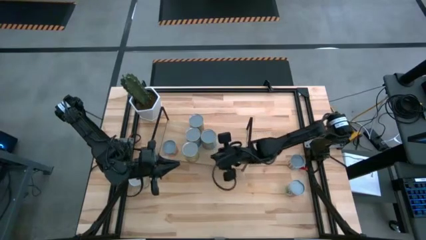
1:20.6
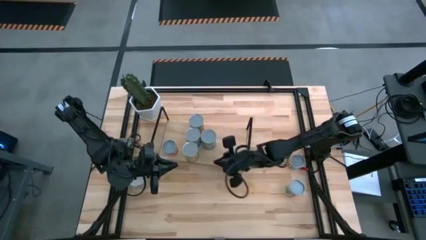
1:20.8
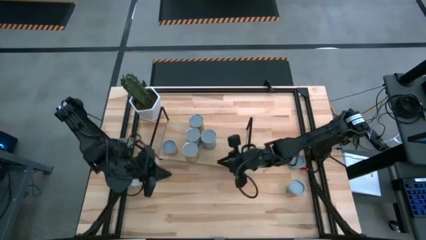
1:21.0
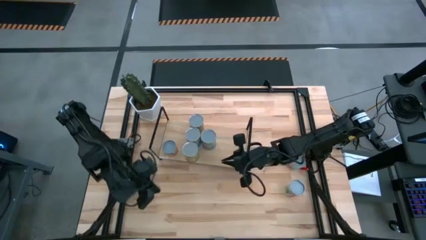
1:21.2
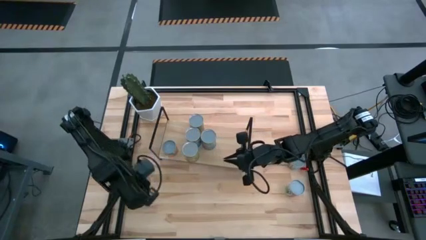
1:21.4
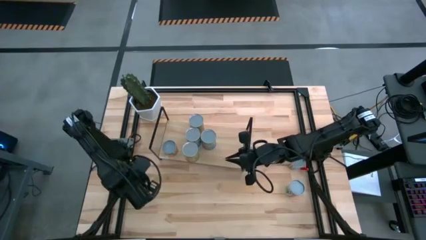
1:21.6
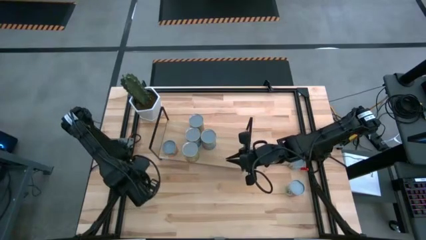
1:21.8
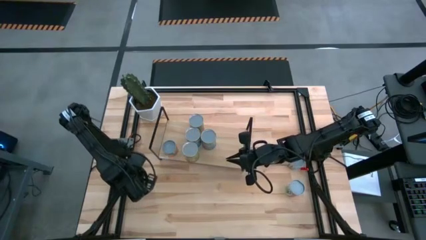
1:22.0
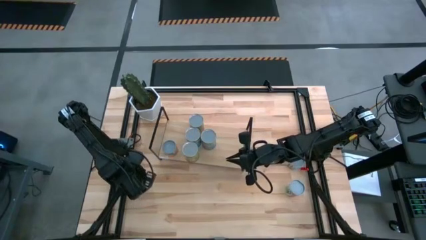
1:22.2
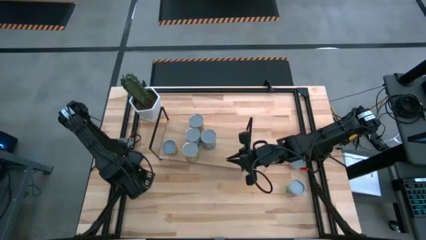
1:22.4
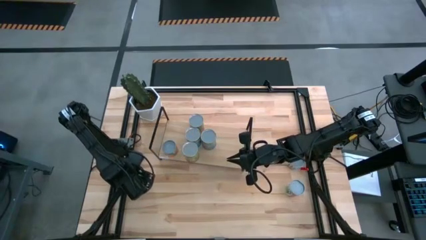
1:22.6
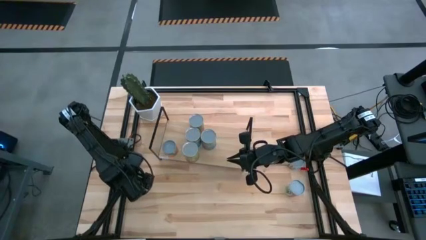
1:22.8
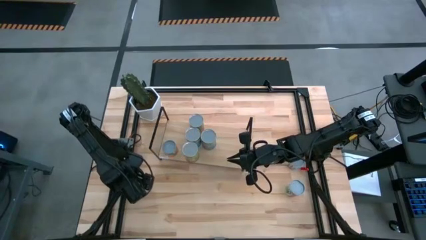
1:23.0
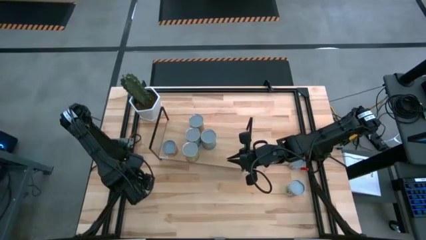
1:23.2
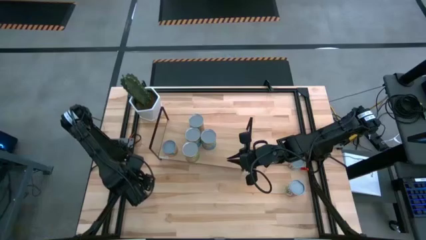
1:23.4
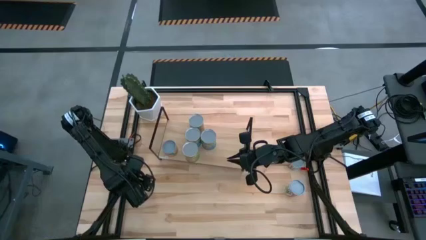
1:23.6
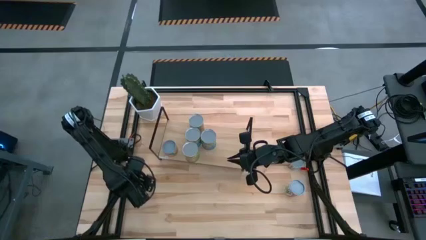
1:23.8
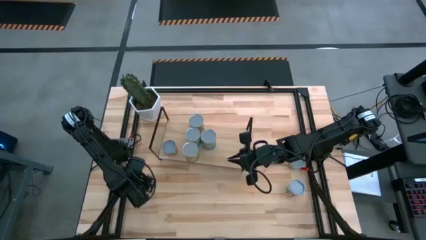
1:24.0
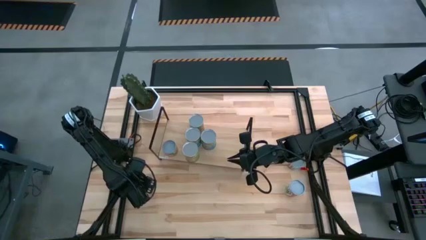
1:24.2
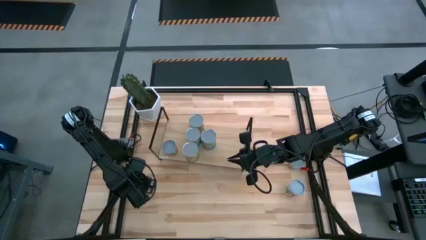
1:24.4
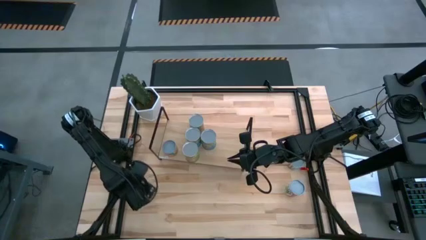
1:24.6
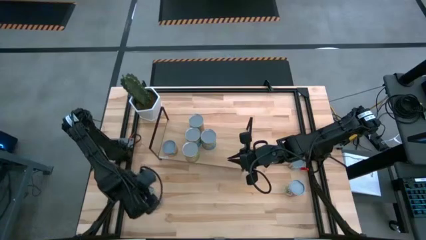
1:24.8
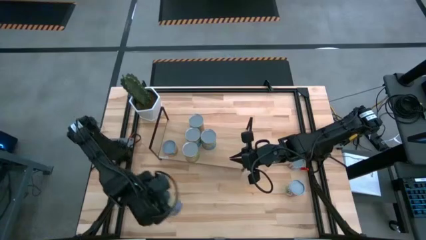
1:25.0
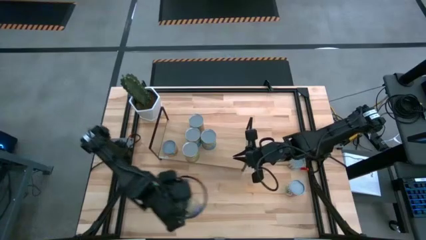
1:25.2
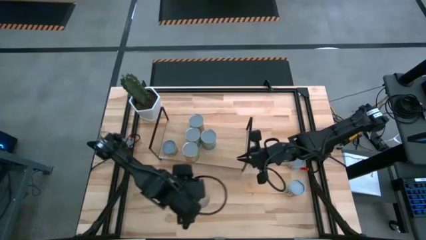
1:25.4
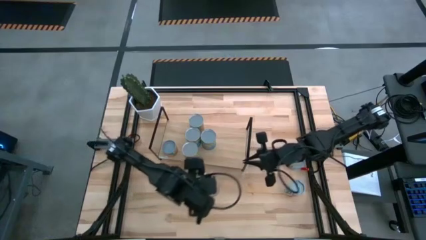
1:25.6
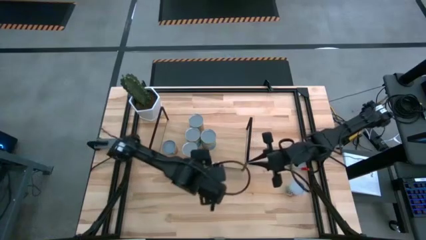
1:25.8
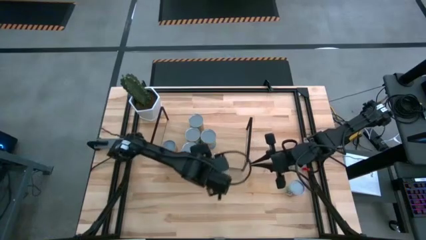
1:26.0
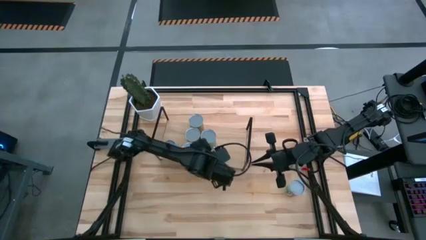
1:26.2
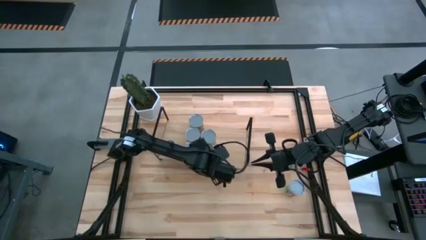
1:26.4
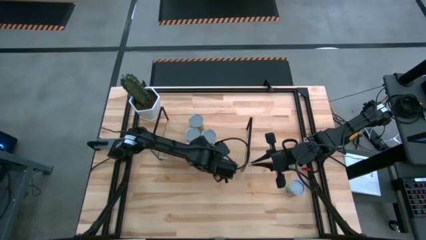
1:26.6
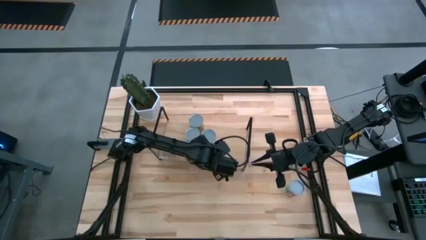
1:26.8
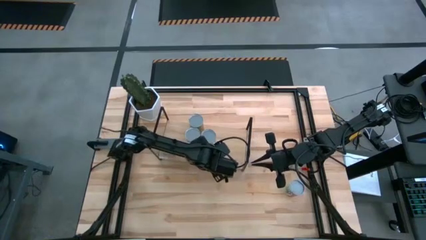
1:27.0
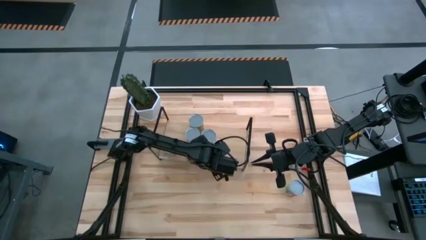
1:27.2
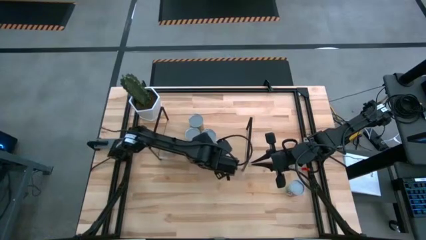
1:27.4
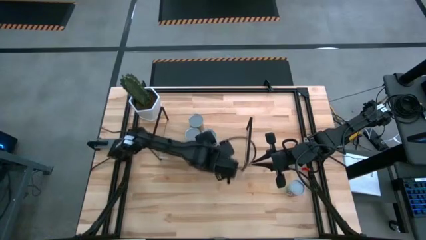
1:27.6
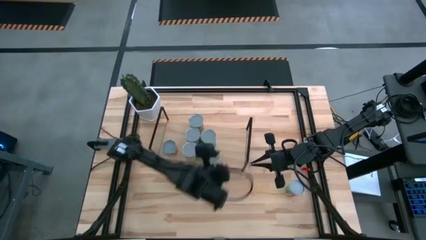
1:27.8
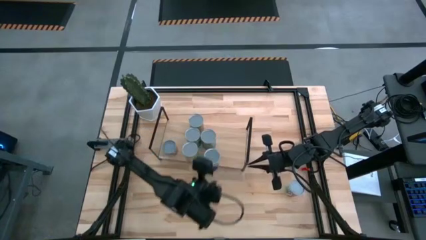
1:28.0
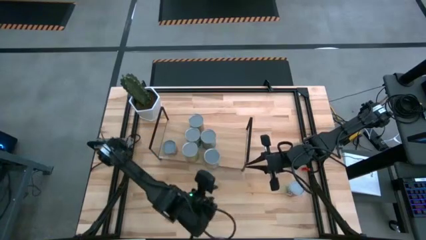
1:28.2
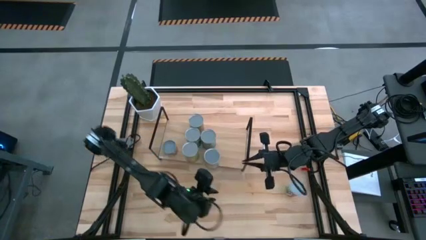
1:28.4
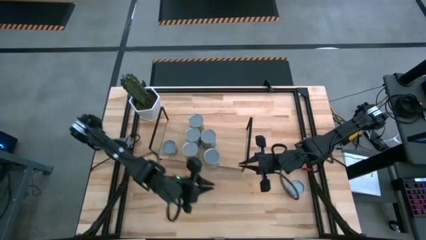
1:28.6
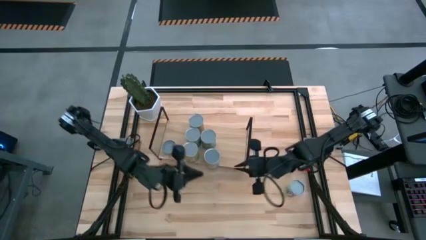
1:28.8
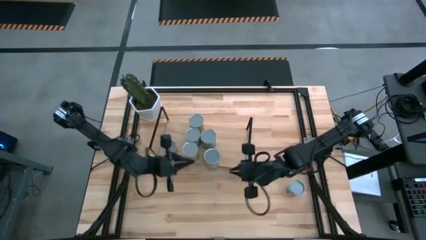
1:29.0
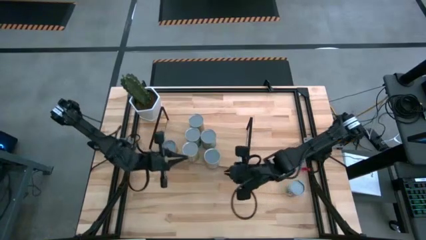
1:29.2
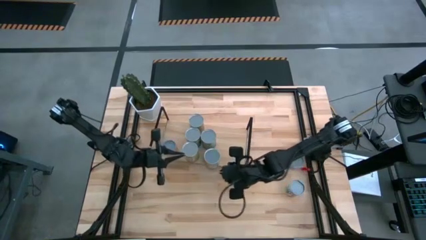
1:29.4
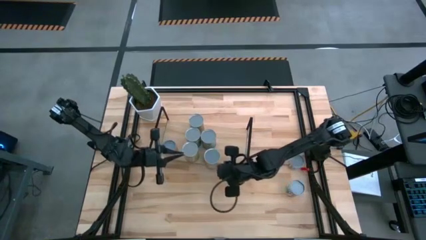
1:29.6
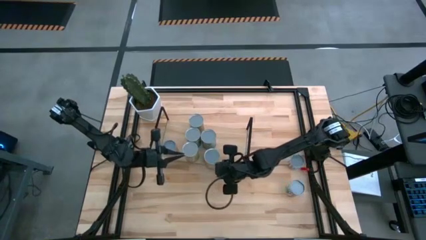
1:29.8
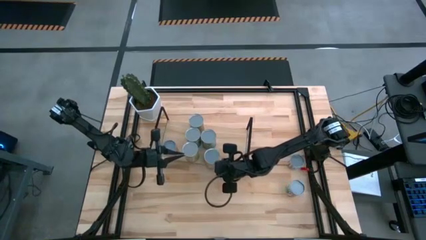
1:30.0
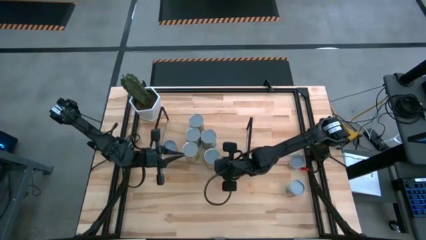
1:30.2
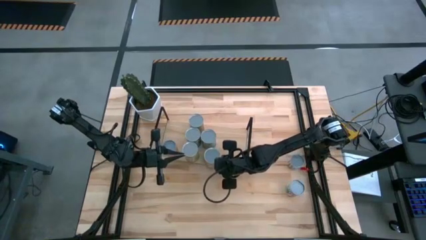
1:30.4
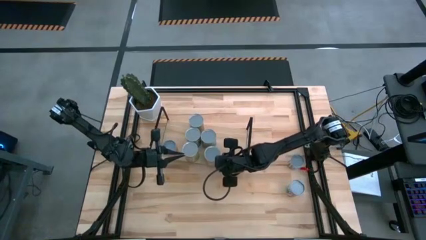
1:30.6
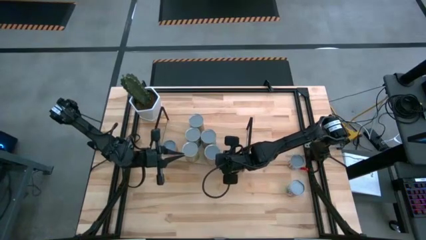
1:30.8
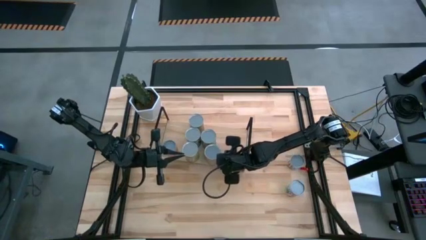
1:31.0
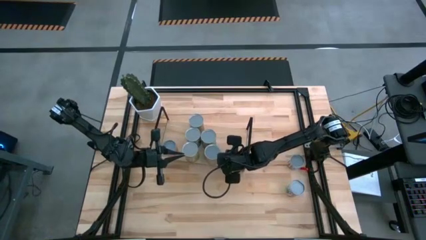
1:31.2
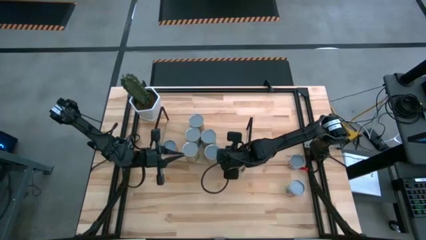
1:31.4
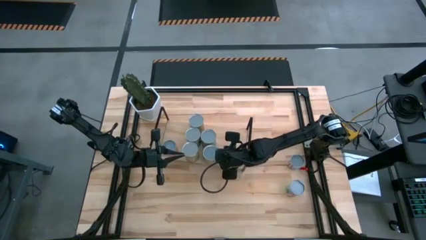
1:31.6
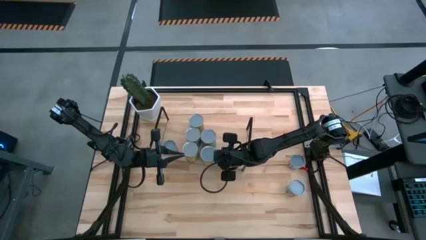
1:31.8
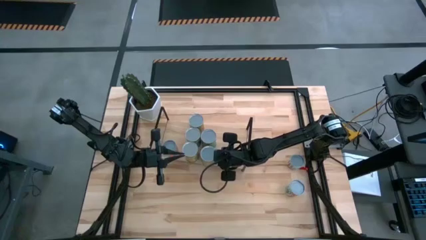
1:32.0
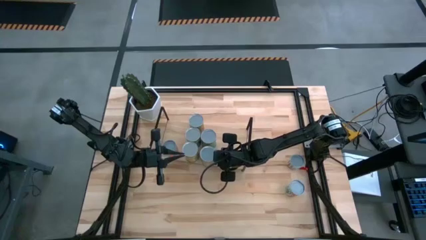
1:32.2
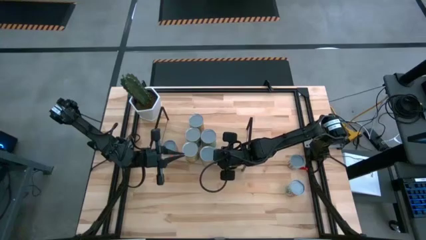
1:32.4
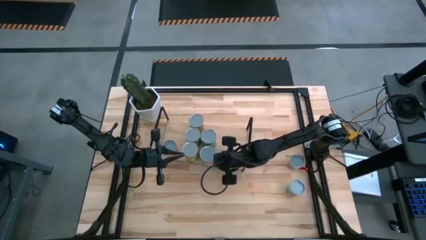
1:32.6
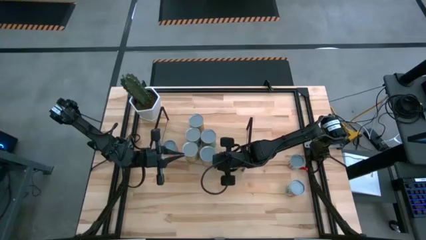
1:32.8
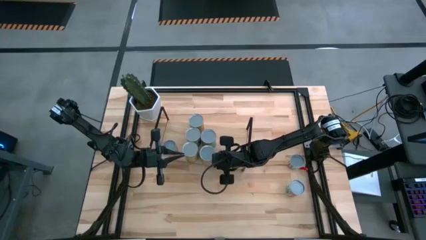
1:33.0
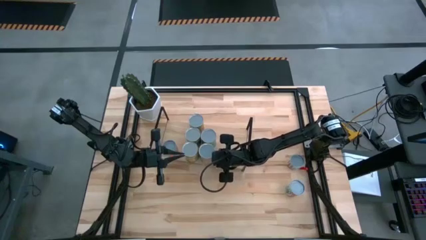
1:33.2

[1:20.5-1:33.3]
Task: Pick and place cans onto a shelf
Put the canned peaches on the shelf

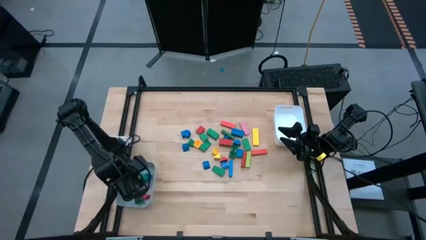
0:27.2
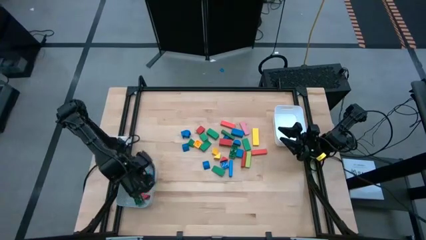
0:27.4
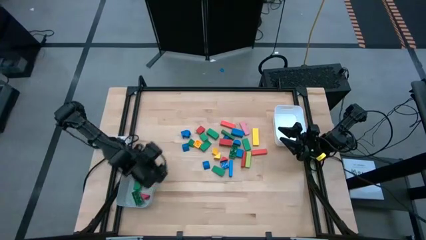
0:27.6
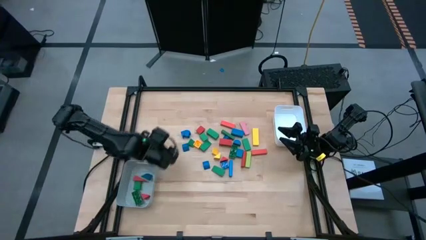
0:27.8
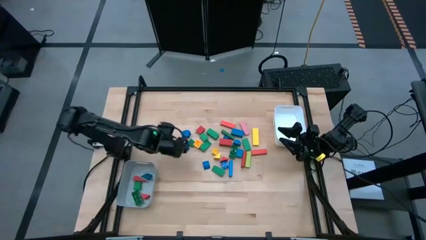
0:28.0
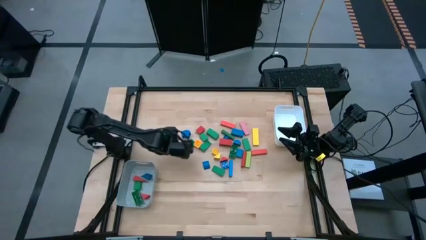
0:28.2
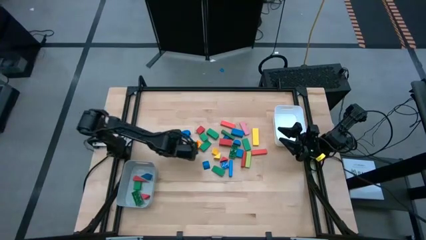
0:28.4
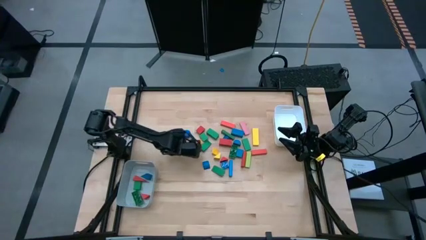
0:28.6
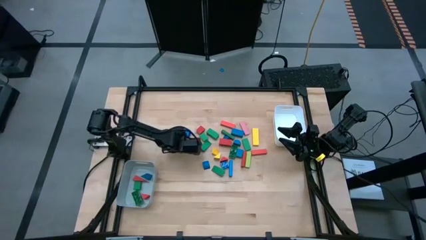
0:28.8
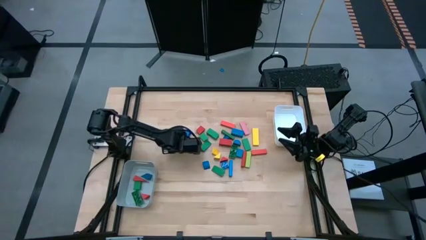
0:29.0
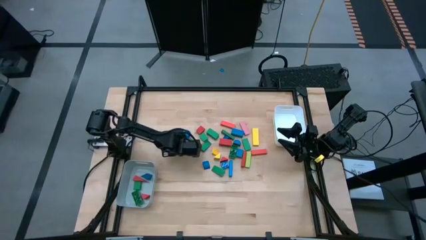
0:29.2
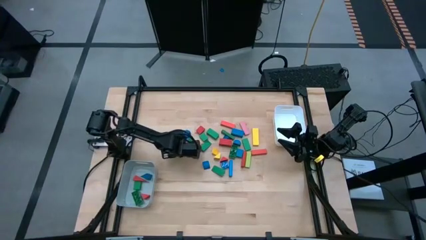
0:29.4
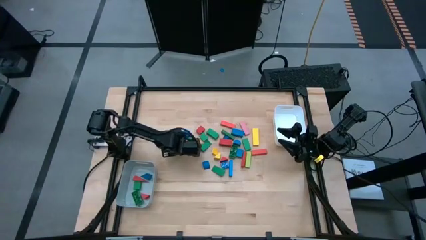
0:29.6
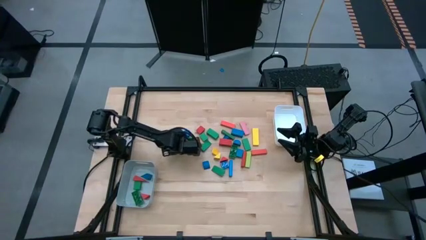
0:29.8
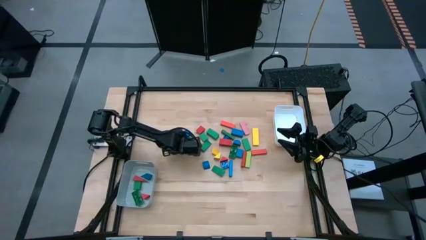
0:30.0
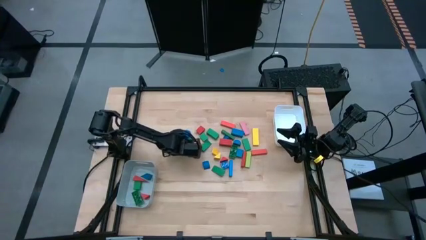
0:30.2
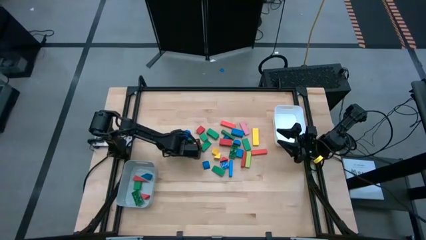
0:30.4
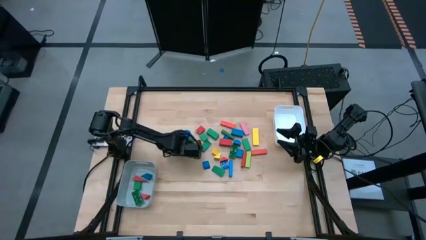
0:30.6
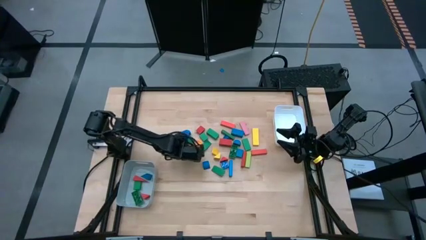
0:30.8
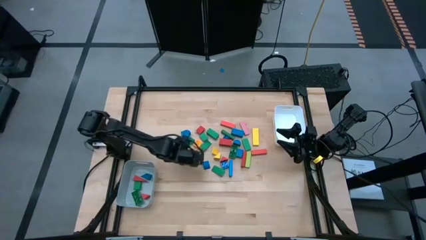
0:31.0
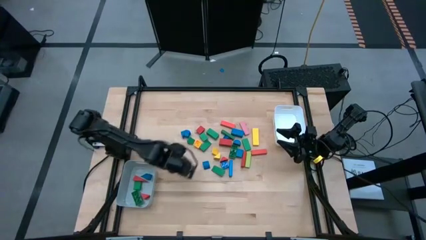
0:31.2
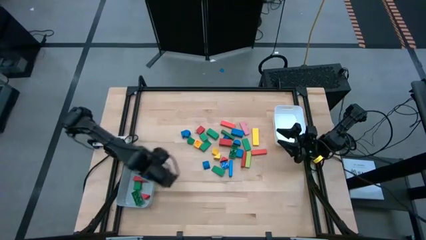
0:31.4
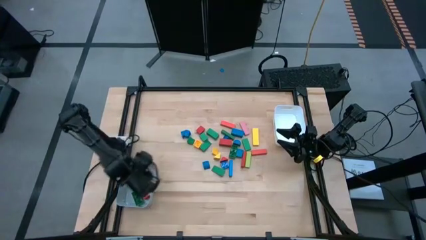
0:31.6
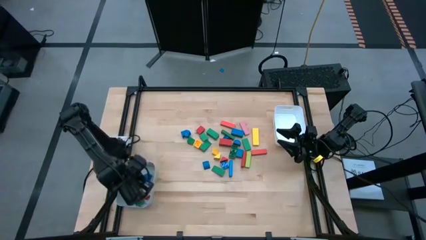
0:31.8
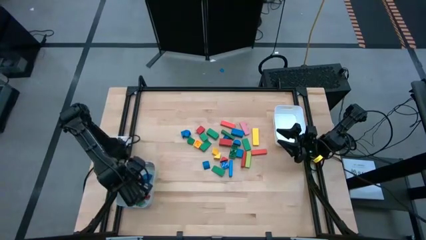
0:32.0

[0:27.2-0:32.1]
Task: Sort blocks by size
Put the blue triangle block into the gray bin
